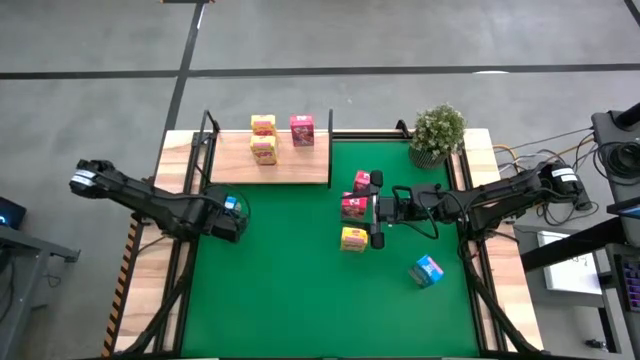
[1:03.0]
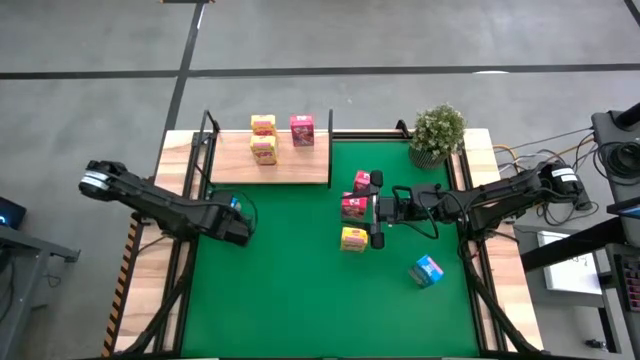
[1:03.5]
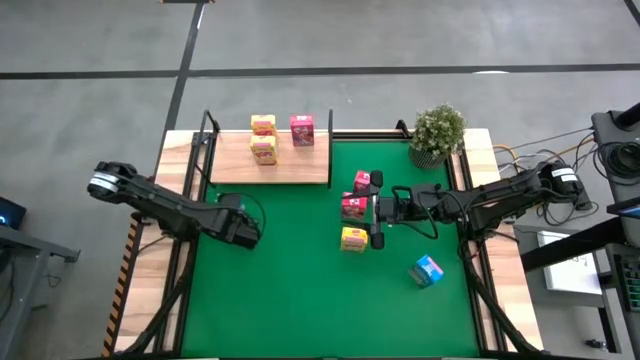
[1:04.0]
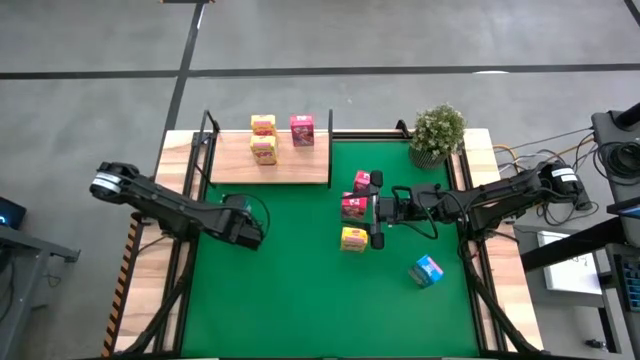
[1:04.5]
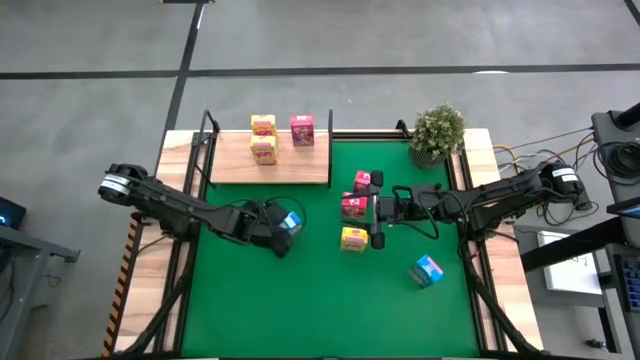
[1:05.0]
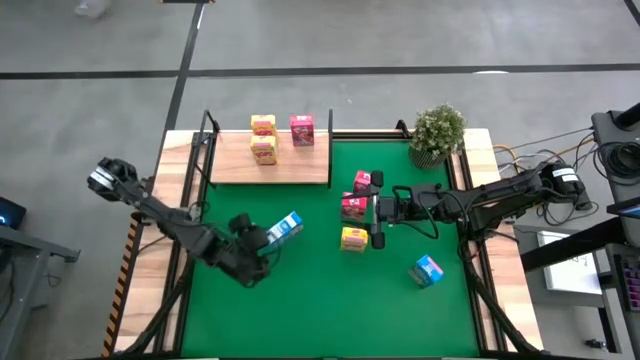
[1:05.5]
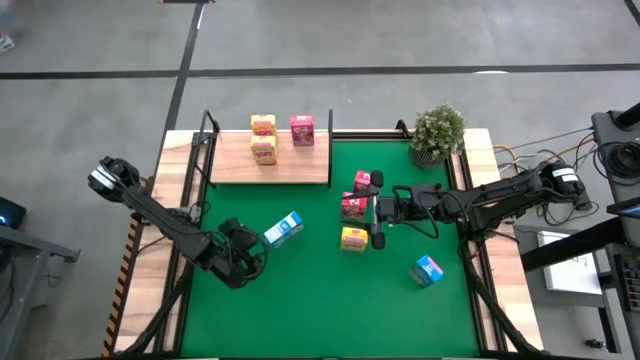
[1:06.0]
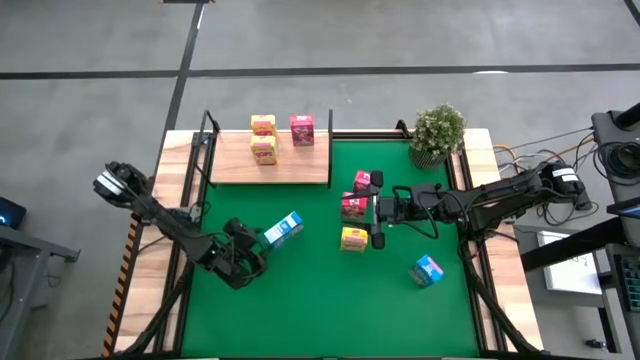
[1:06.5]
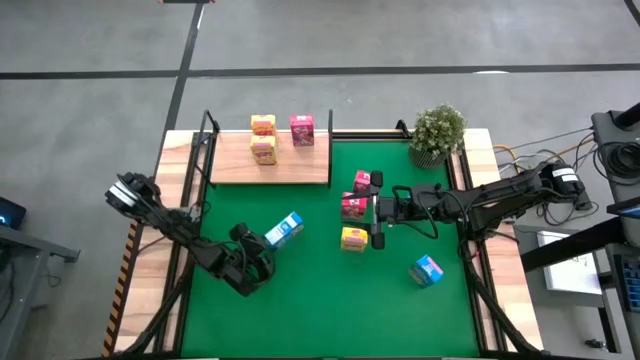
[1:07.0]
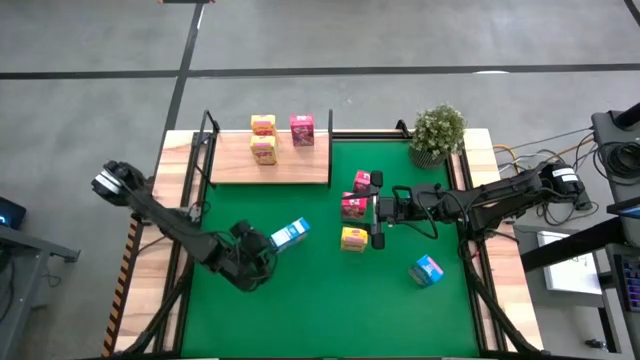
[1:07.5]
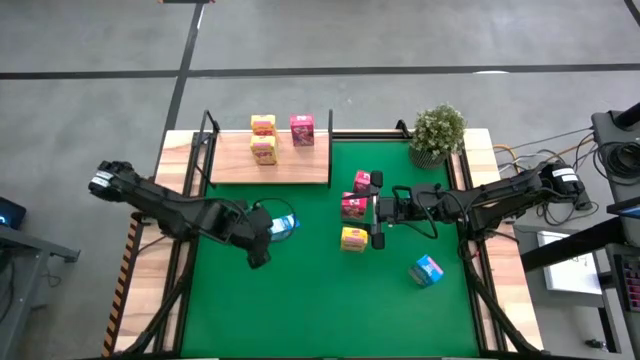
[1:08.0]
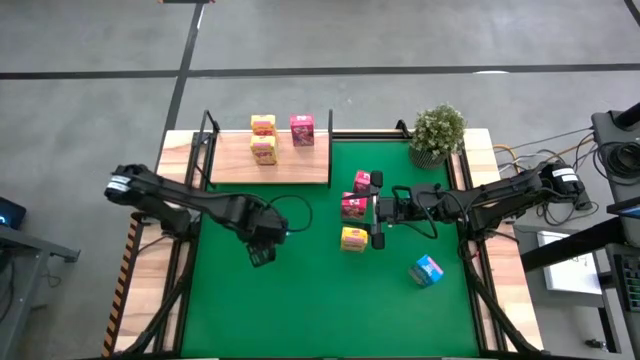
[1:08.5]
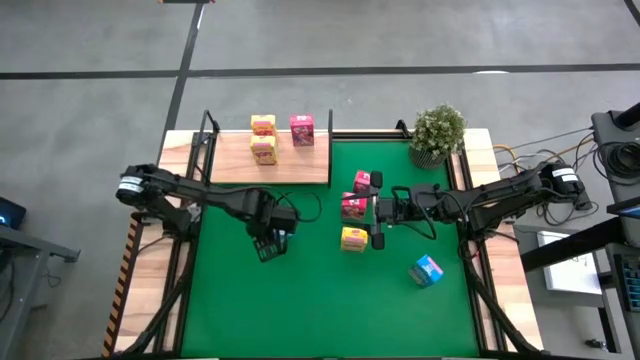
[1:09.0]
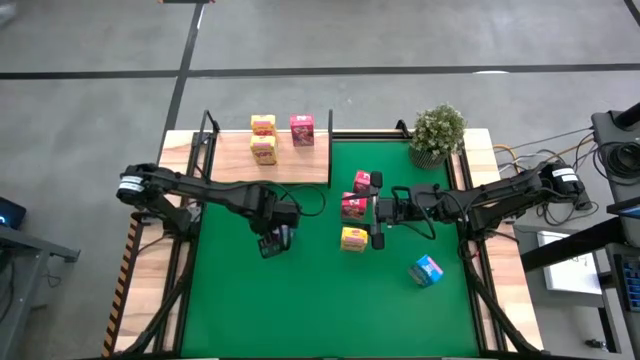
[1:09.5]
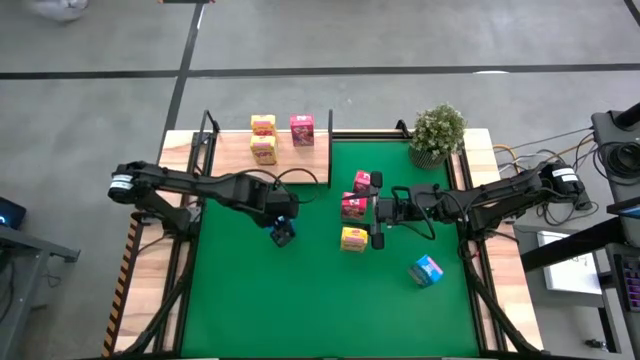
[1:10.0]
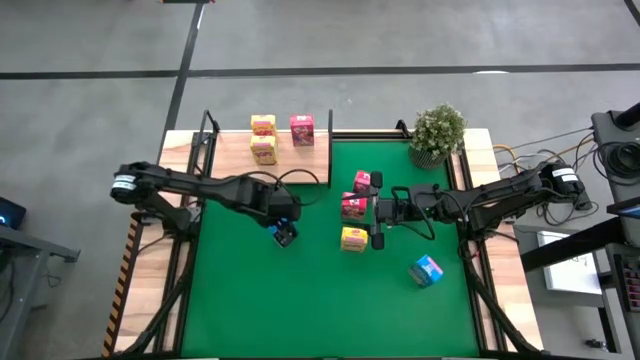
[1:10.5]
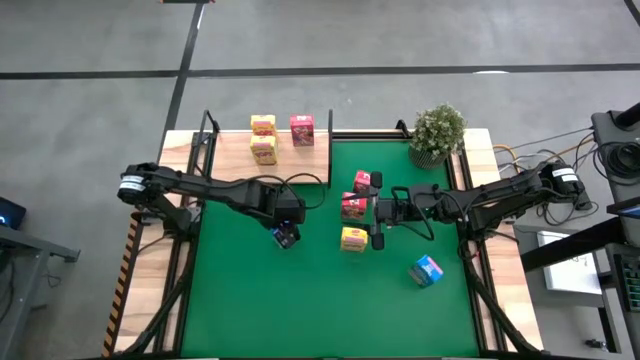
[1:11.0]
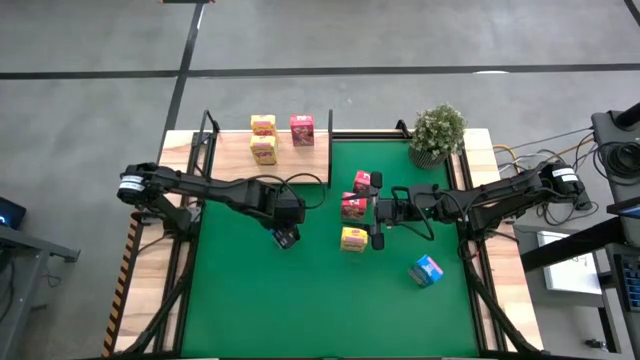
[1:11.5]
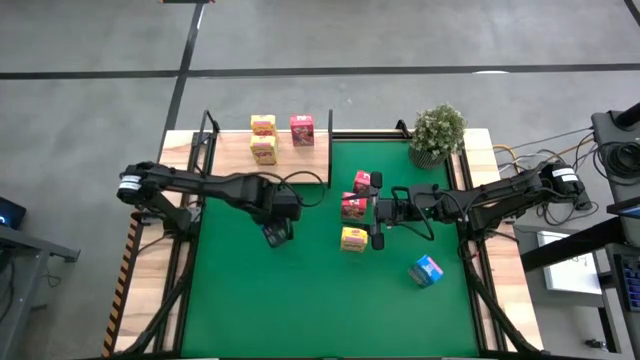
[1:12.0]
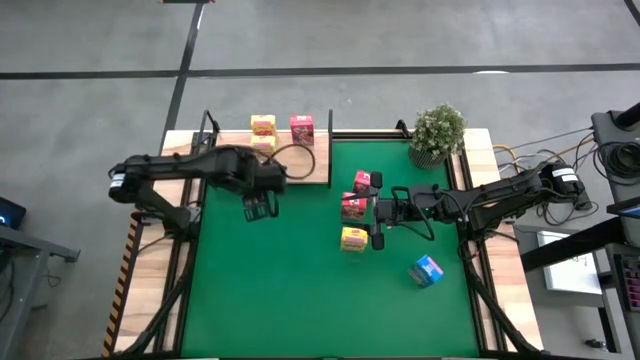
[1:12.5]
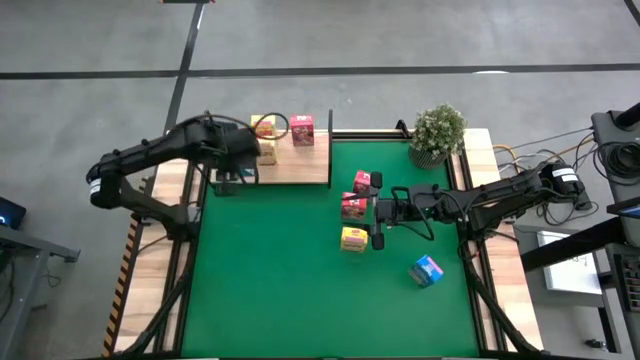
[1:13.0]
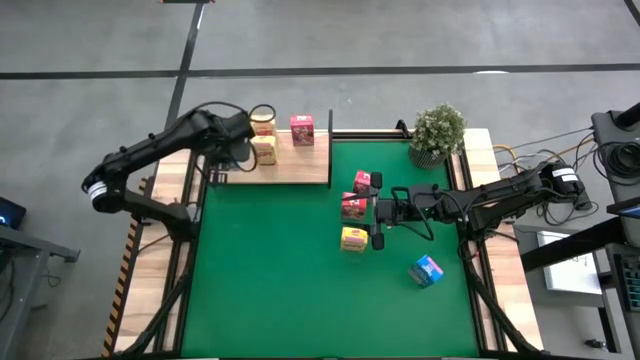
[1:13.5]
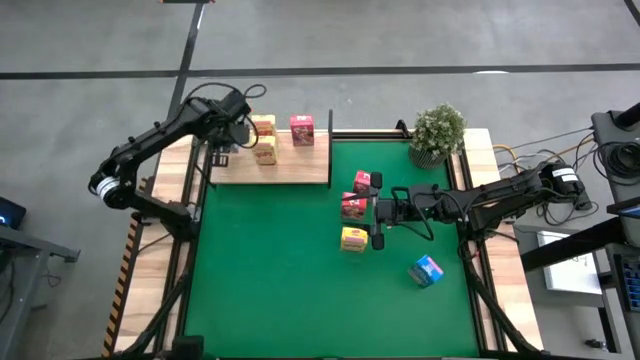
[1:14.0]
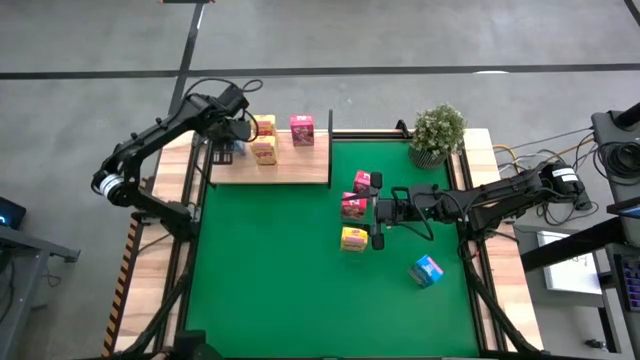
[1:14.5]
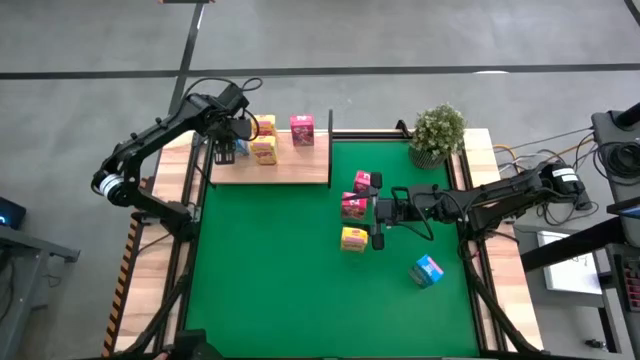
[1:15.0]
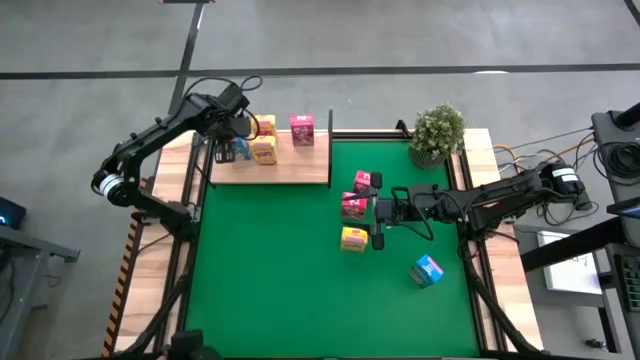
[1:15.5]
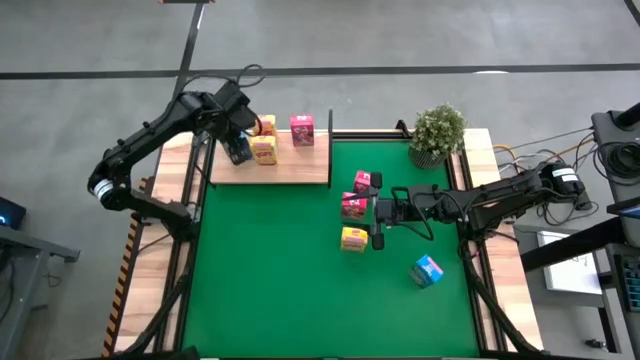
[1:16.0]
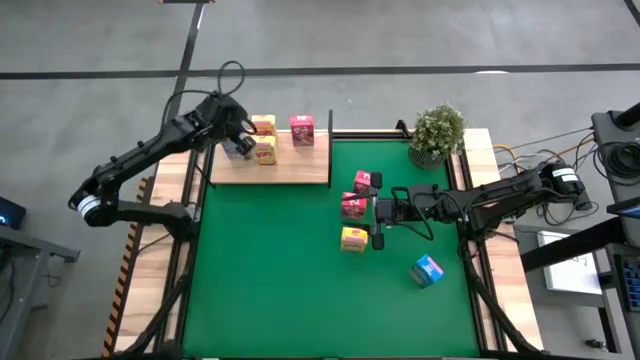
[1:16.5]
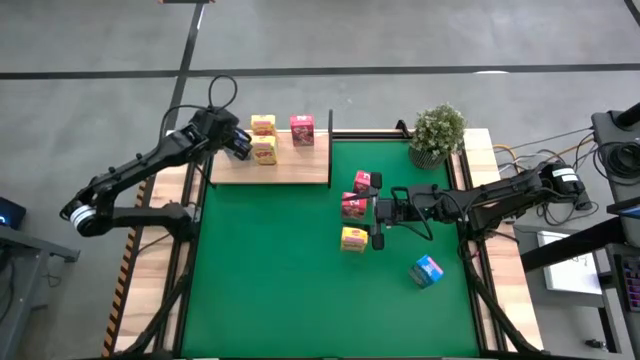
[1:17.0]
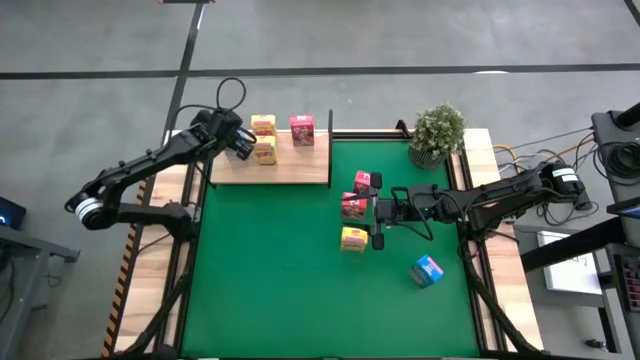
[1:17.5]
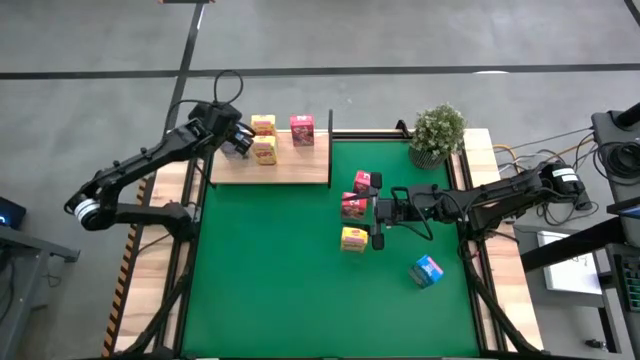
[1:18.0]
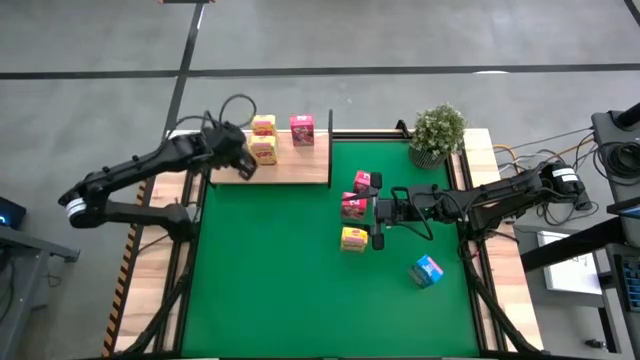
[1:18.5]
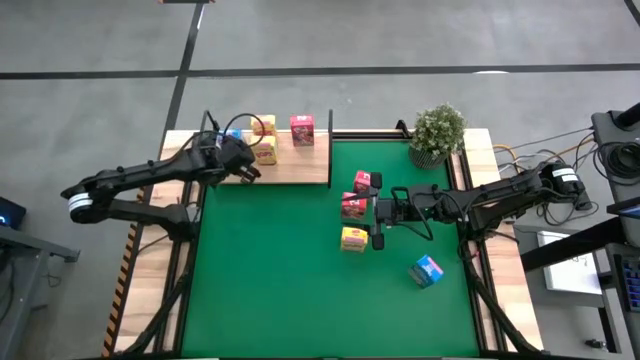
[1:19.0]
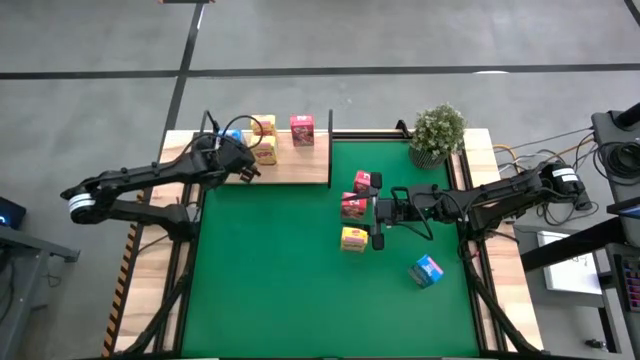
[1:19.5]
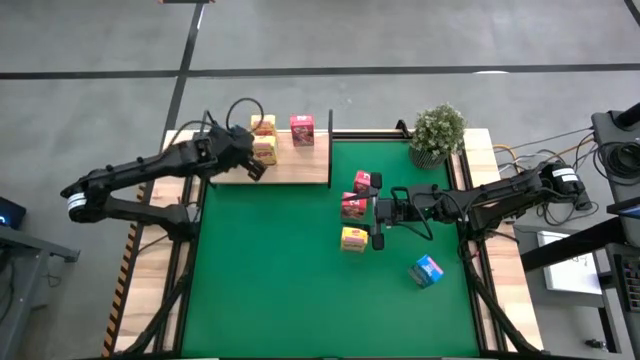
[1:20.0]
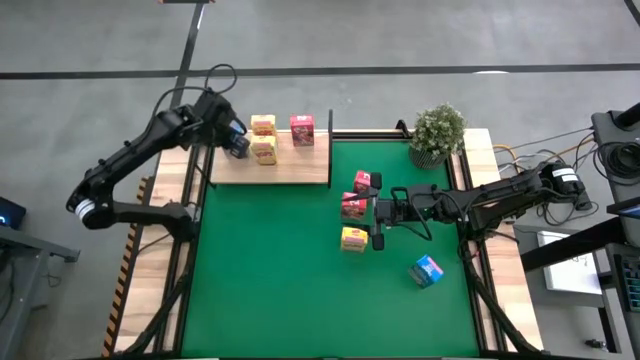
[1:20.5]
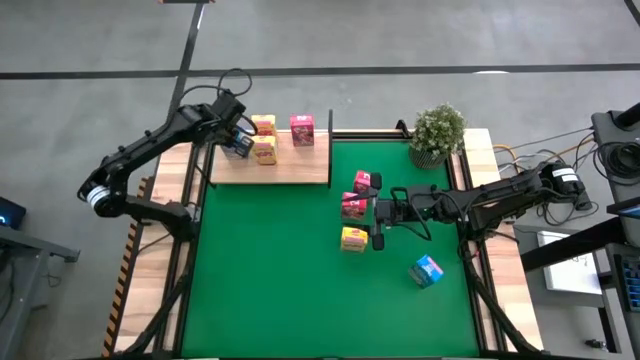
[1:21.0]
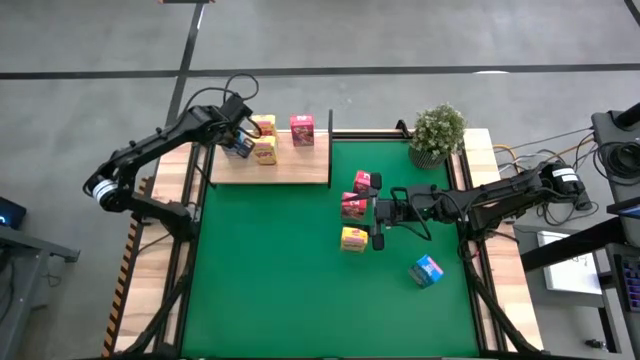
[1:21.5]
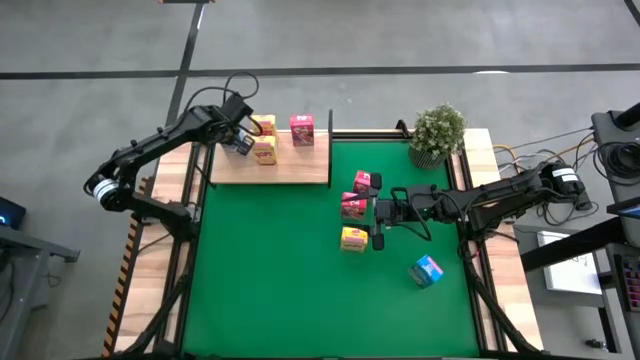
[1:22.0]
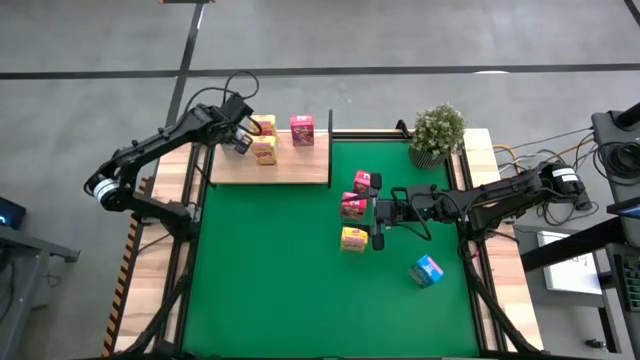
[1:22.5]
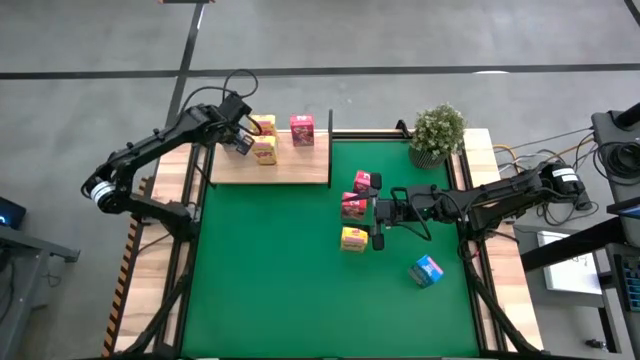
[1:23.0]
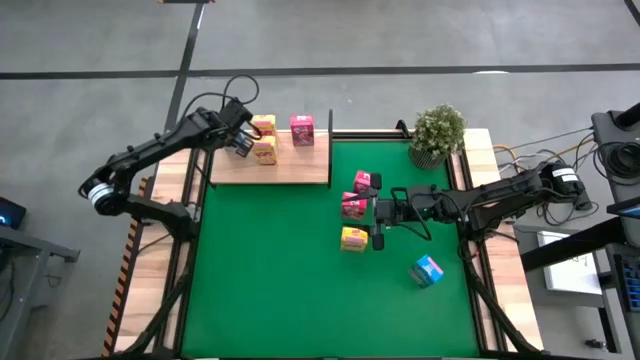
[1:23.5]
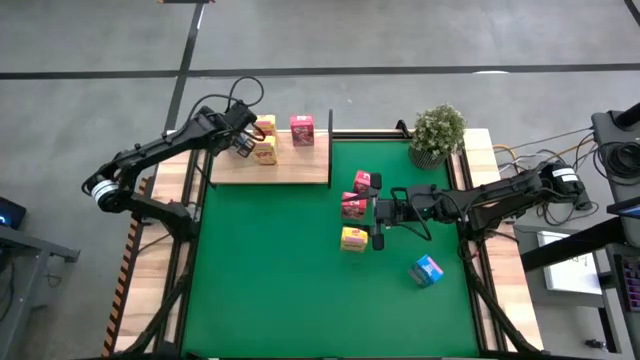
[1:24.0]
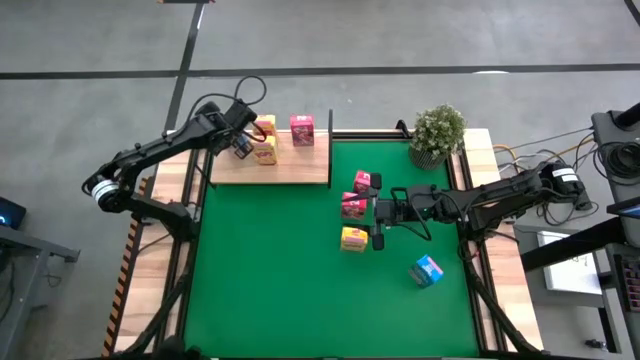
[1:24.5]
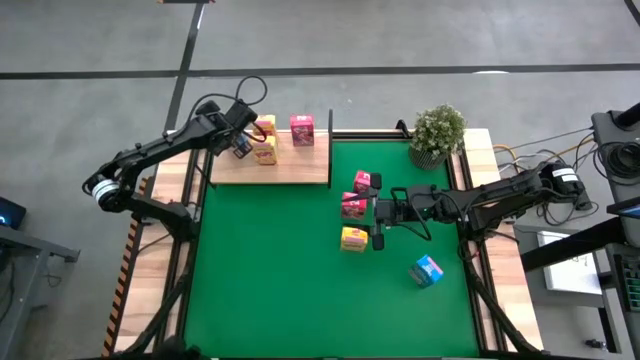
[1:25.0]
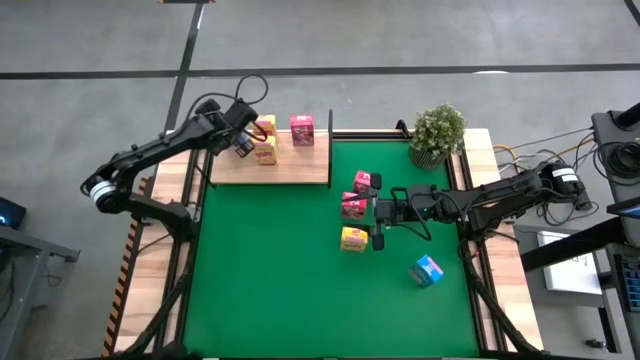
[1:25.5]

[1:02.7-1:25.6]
Task: Stack cereal on shelf
Put the middle blue cereal box on the shelf
